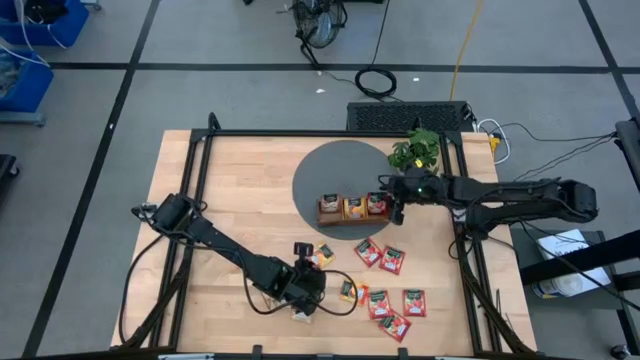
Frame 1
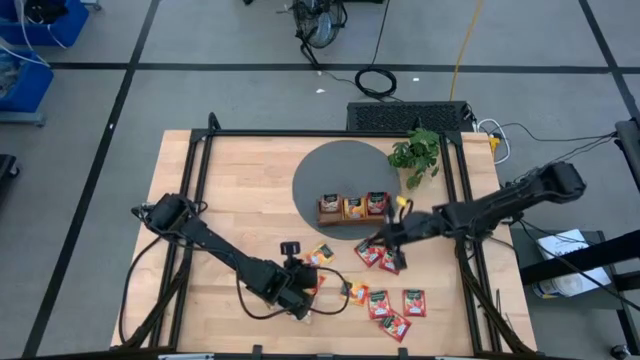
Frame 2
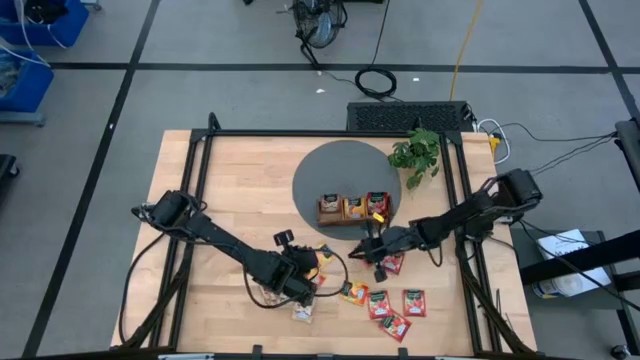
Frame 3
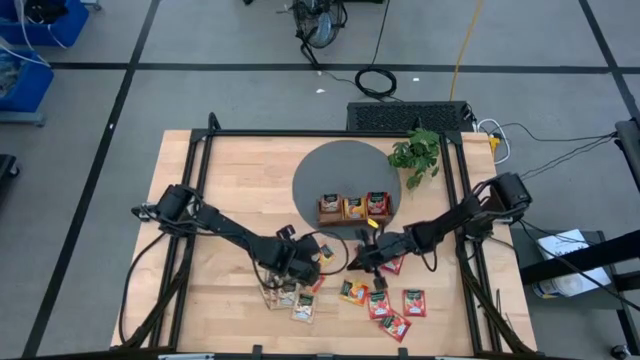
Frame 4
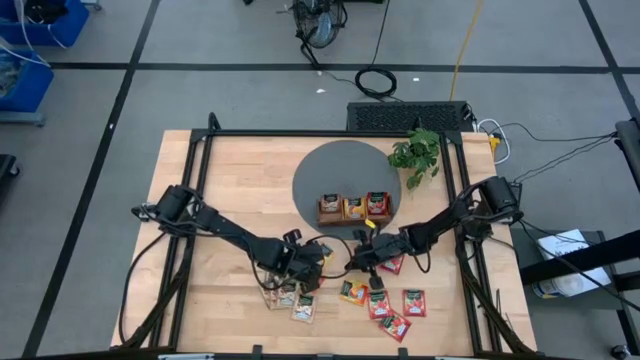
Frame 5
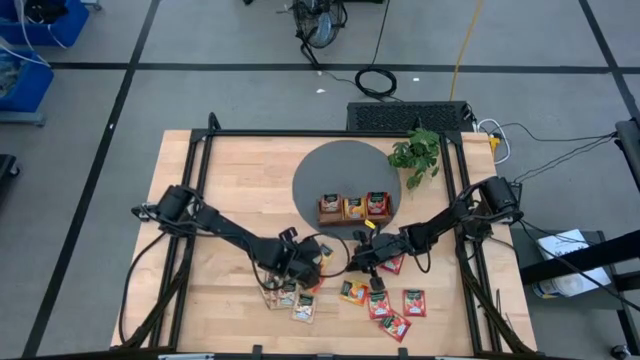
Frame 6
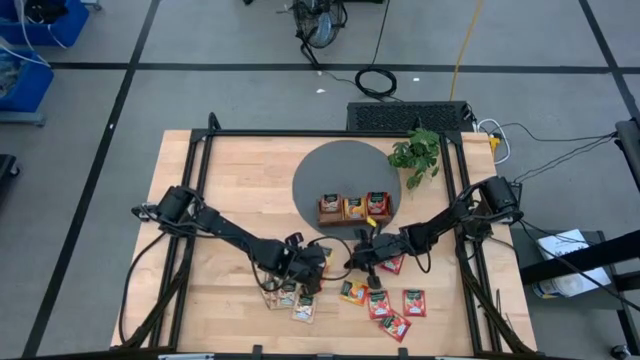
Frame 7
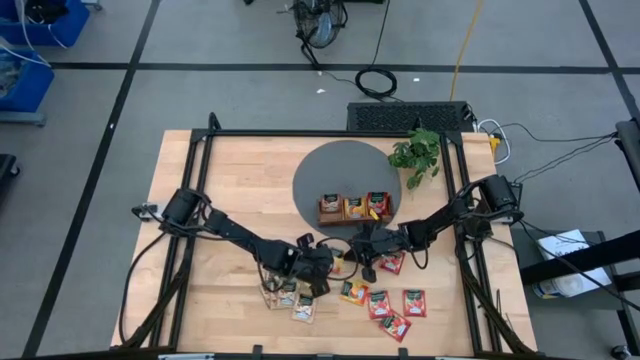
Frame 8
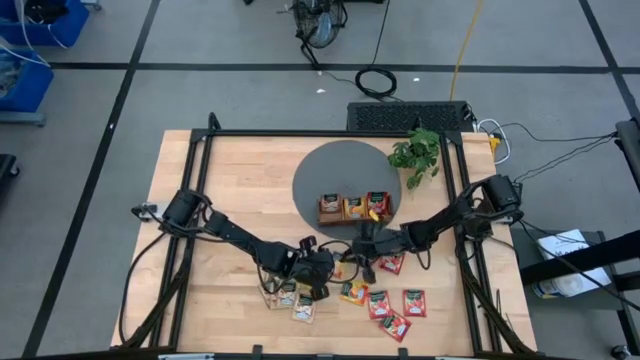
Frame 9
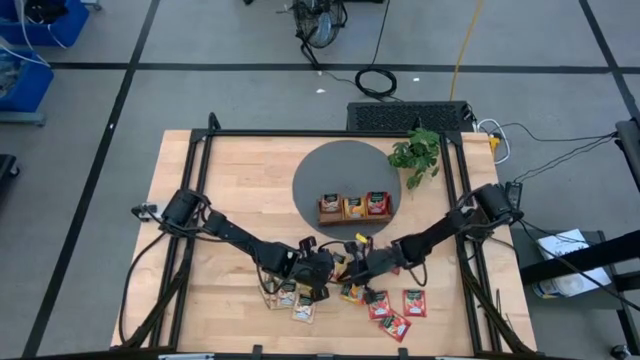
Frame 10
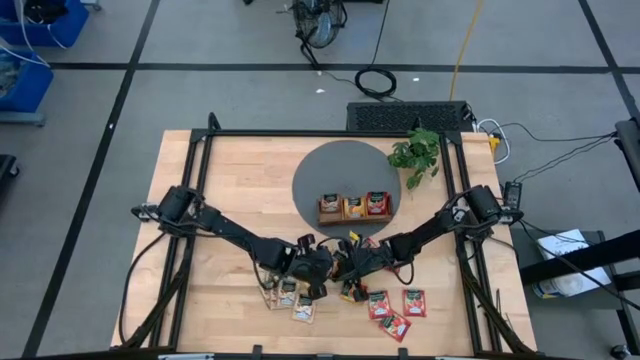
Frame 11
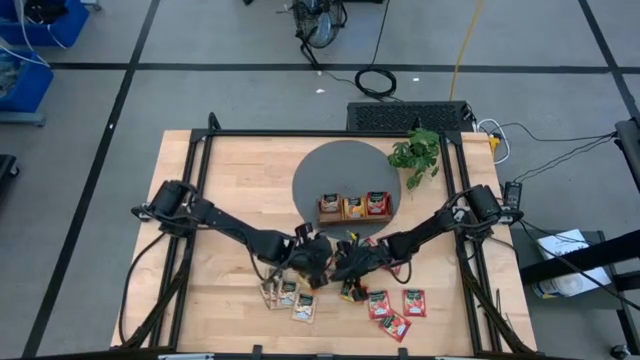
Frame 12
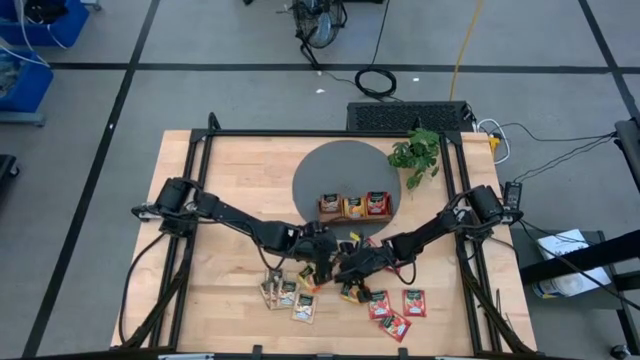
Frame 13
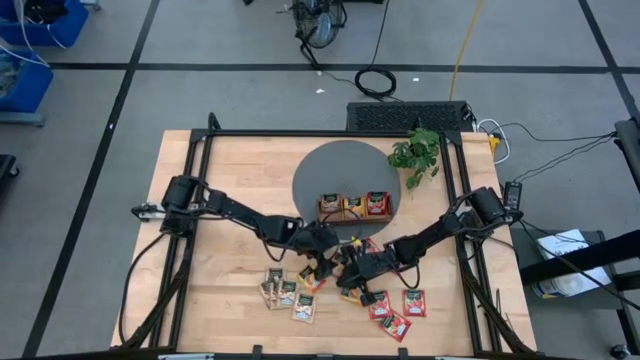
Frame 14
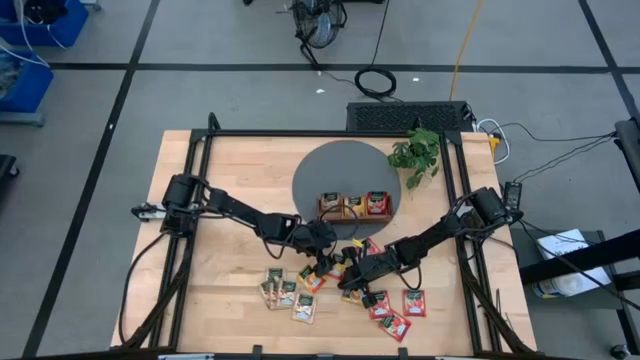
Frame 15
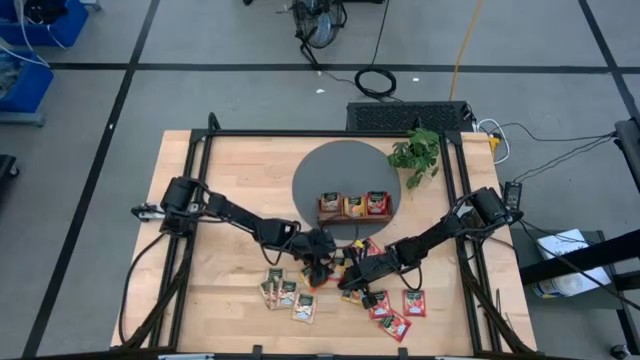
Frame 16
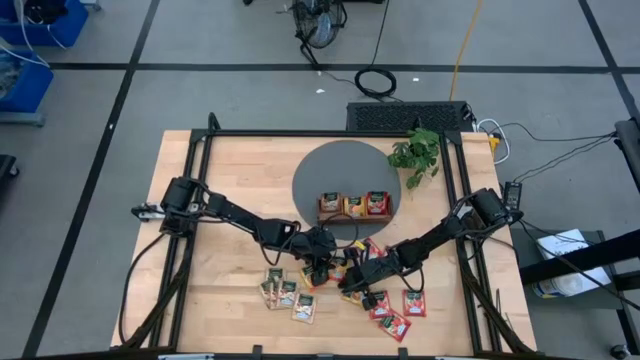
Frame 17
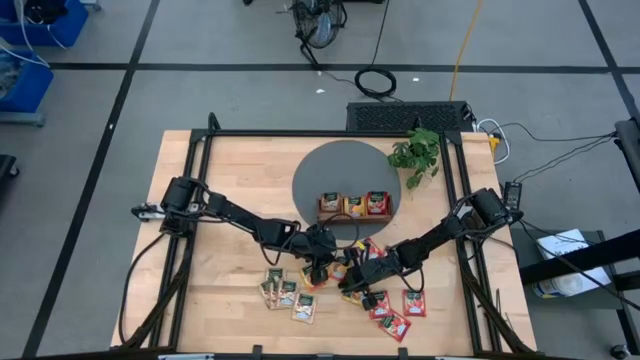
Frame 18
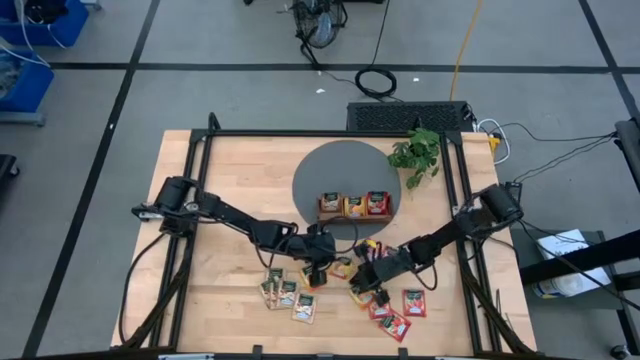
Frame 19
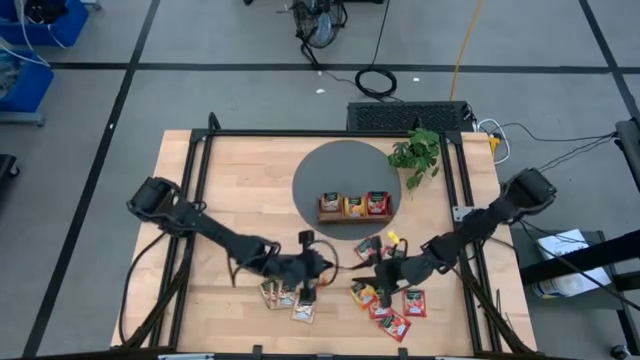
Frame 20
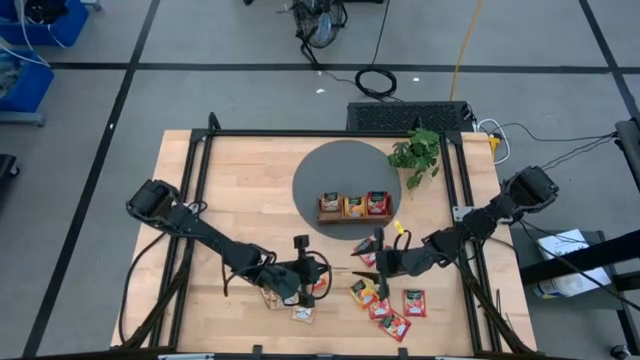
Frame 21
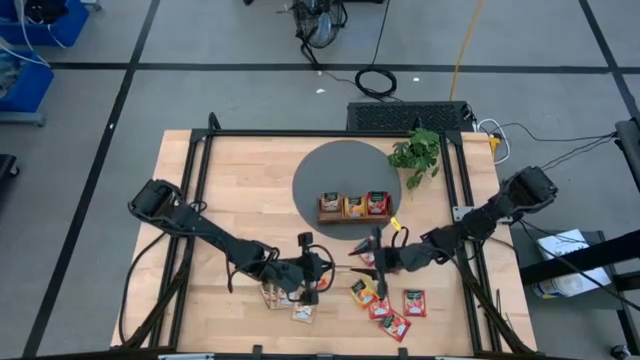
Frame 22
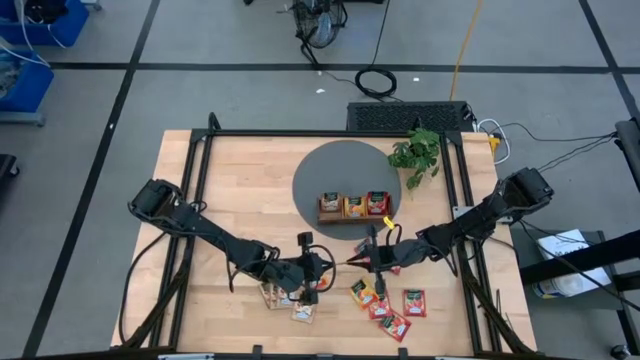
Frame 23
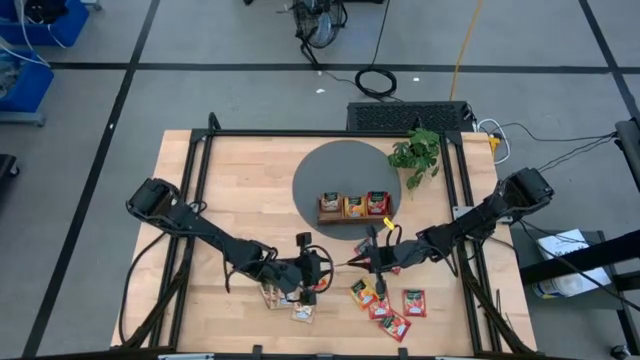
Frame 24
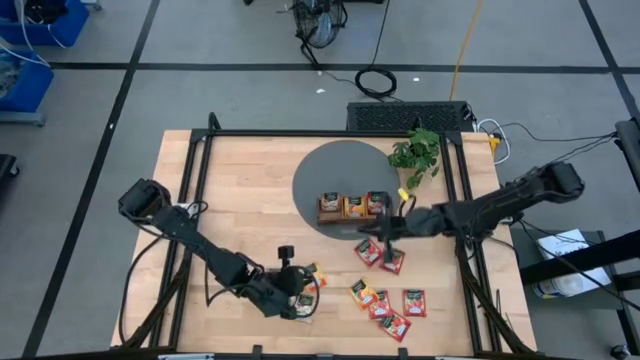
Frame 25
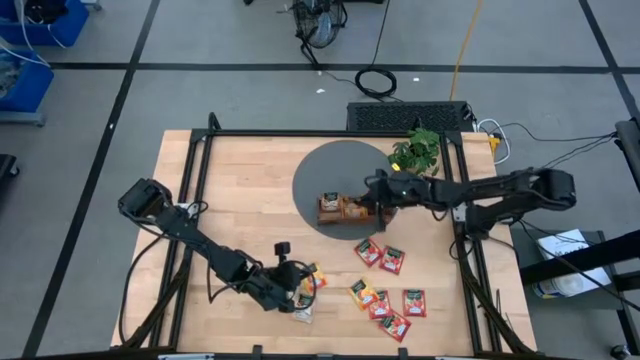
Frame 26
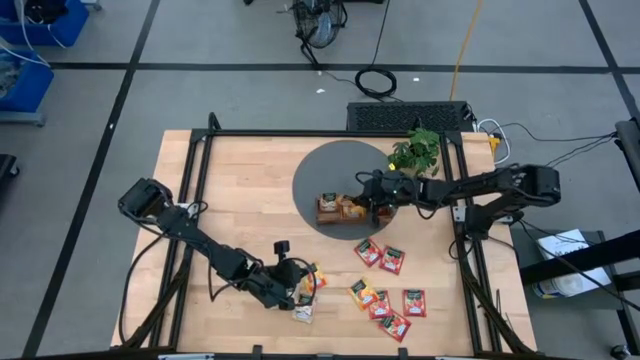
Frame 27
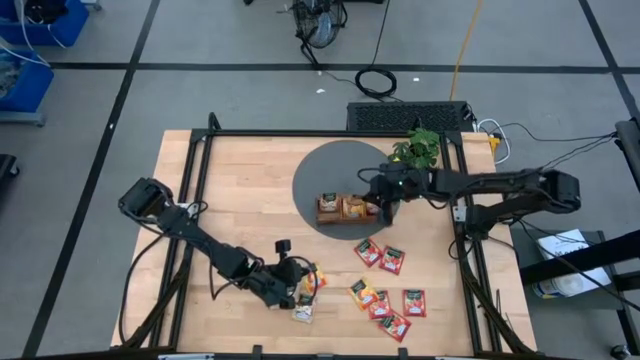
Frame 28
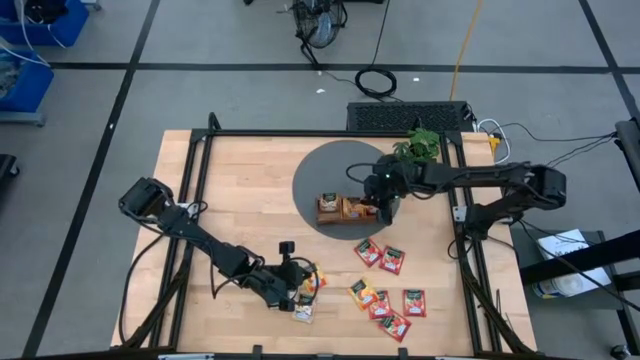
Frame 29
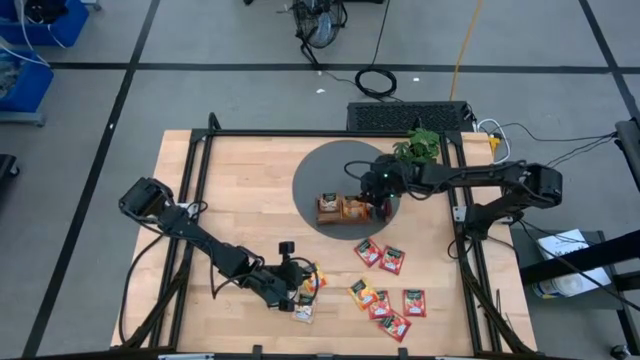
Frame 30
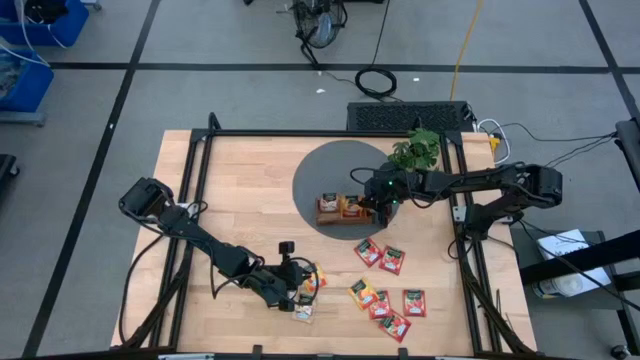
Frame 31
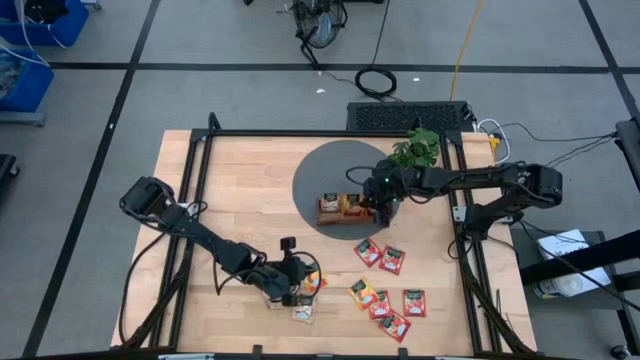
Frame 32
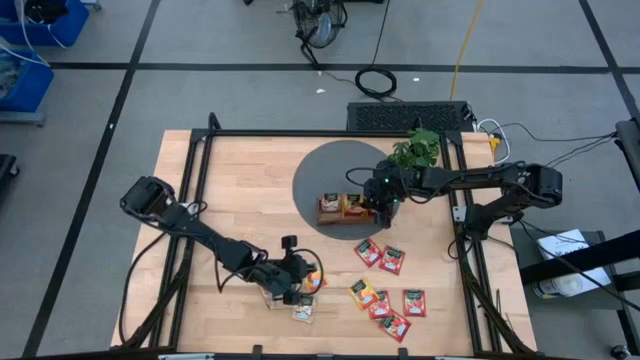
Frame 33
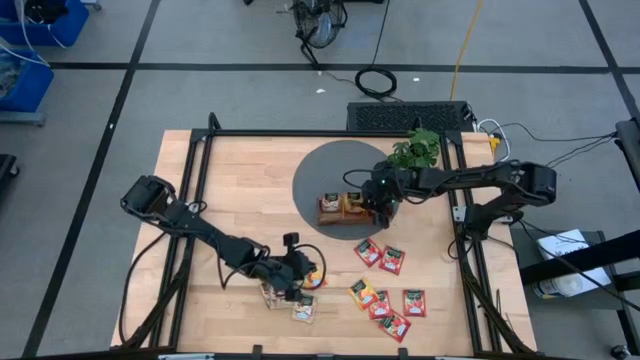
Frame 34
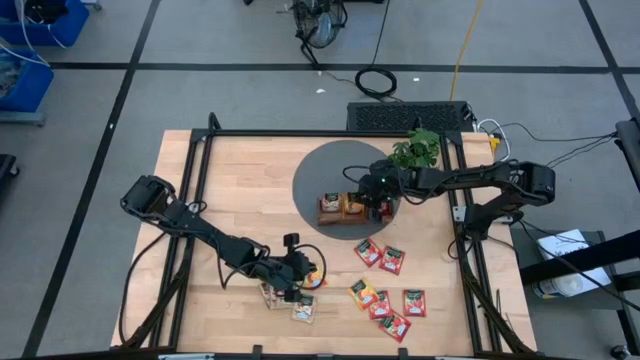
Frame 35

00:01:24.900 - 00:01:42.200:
Task: Pick & Place Tea
Put the yellow tea bag into the middle section of the wooden organizer

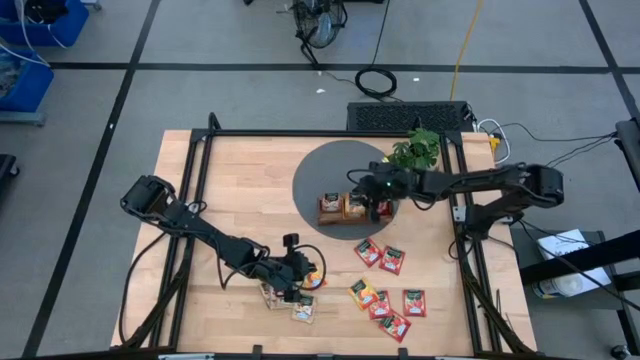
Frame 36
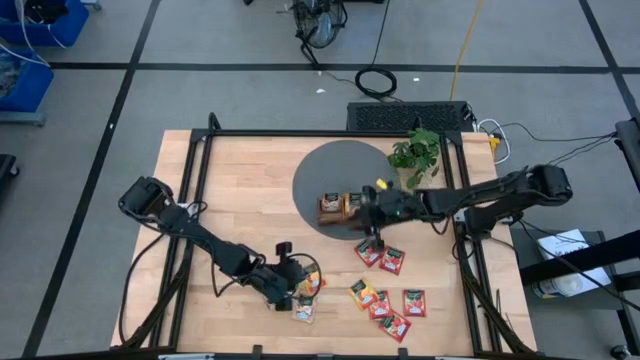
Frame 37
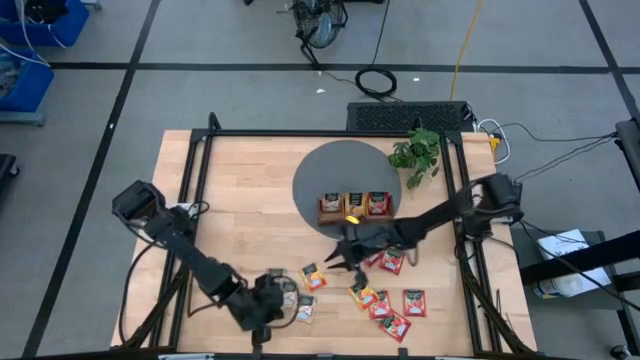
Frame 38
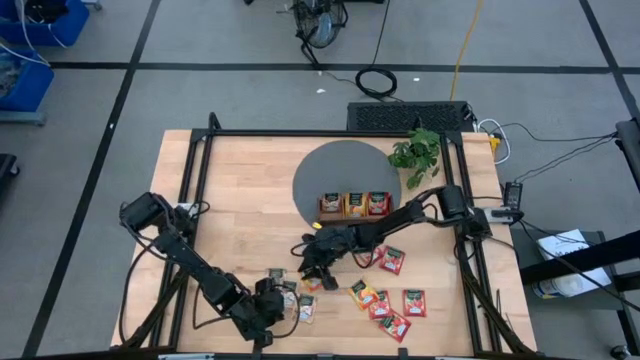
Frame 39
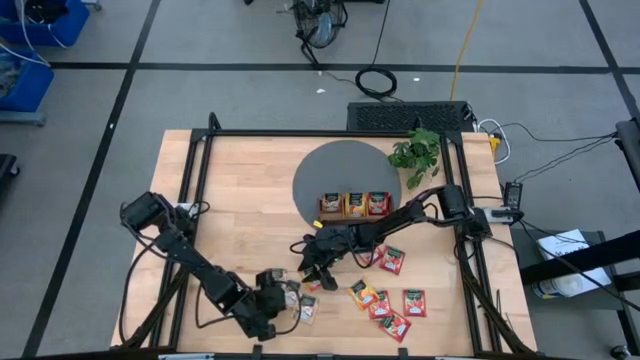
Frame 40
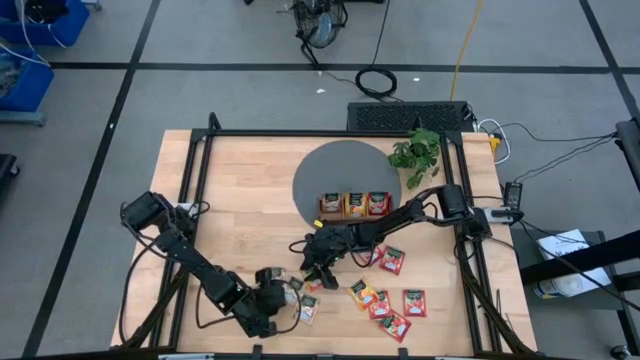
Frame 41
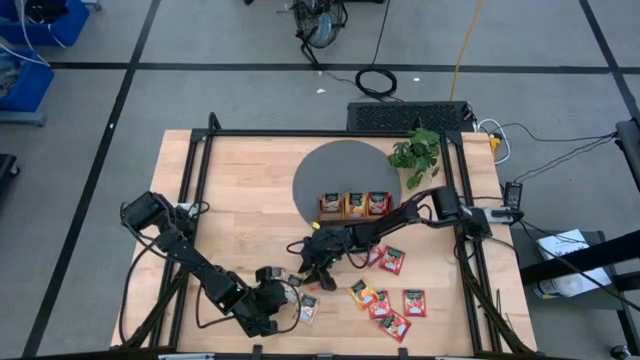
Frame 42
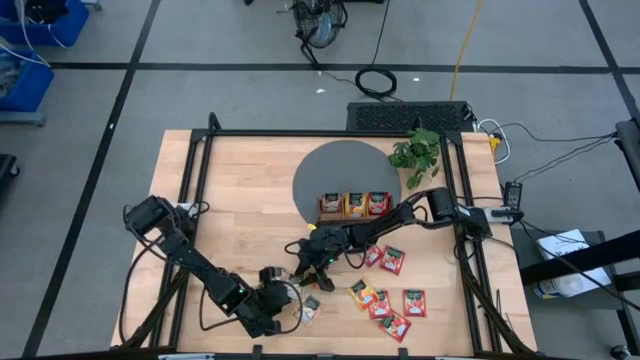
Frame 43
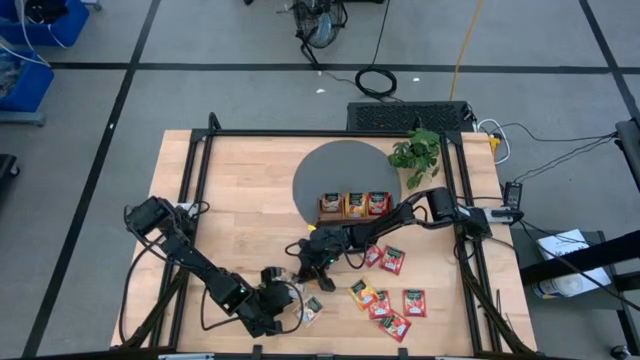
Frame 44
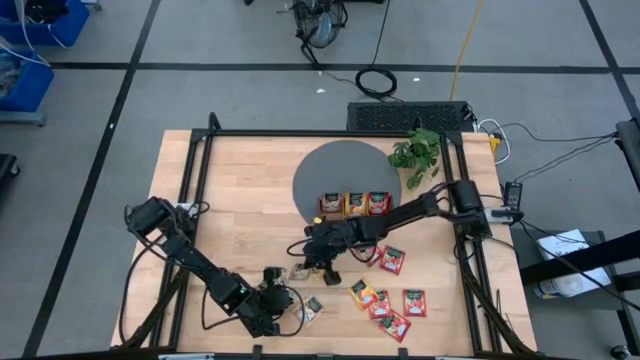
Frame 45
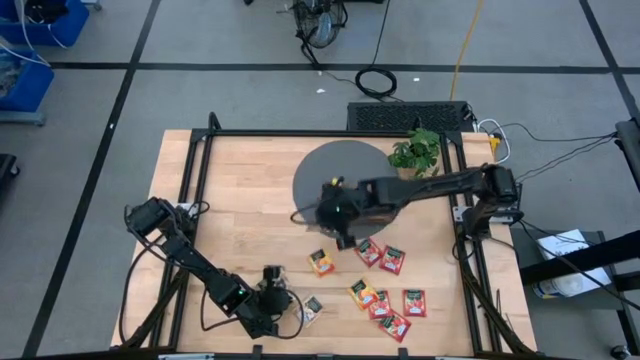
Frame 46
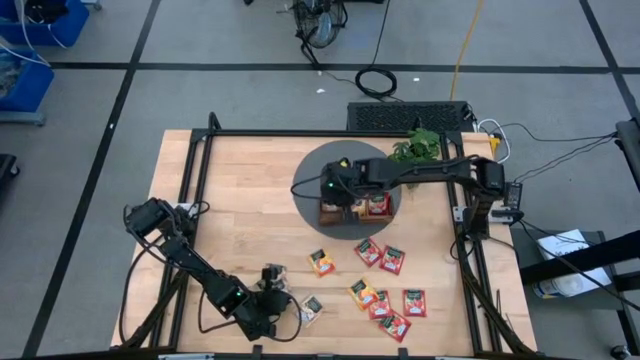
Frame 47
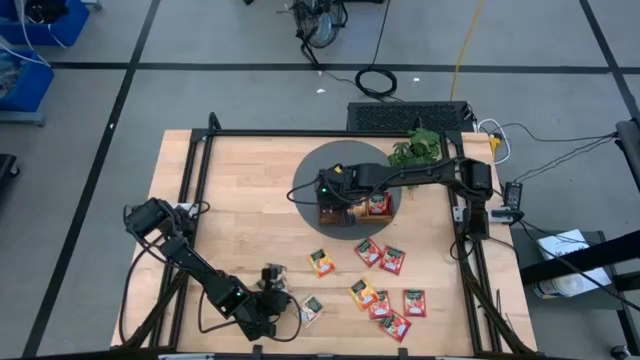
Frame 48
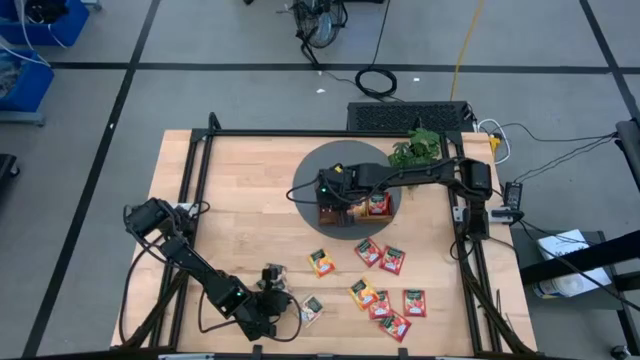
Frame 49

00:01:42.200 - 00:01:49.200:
Put the brown tea bag into the left section of the wooden organizer
